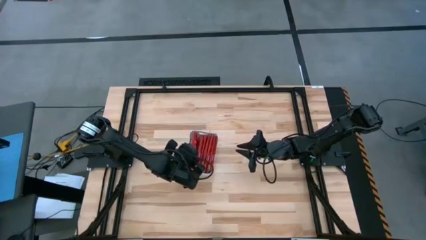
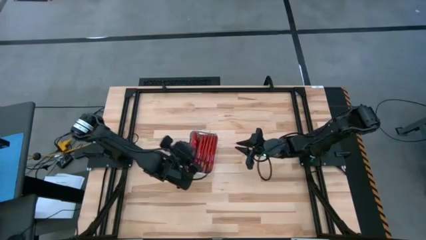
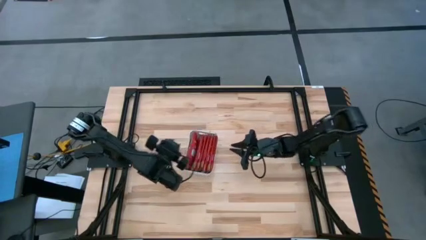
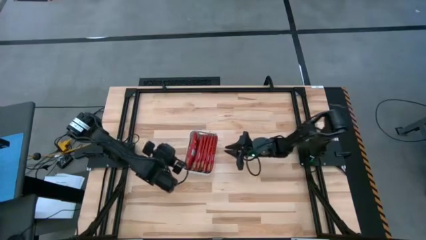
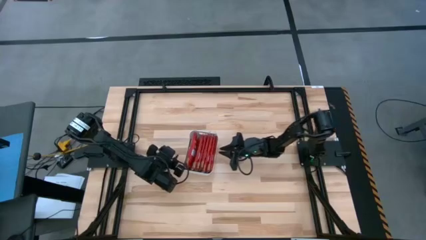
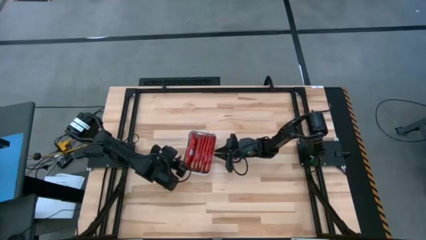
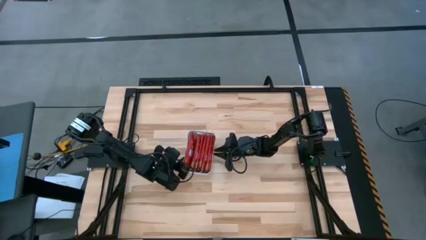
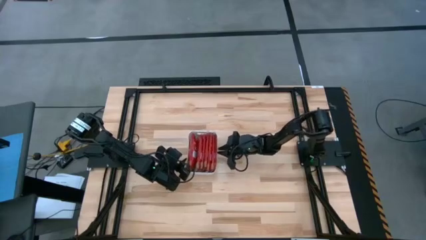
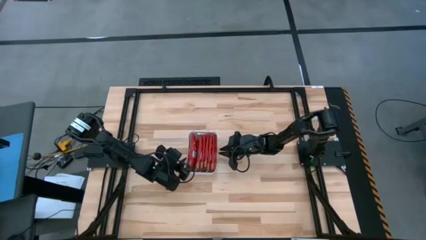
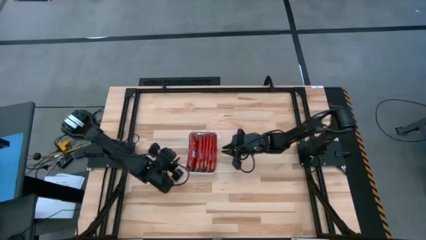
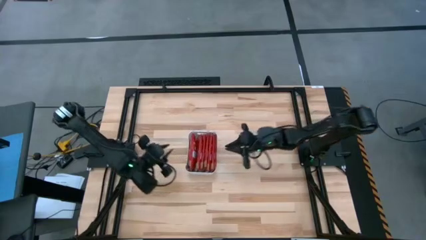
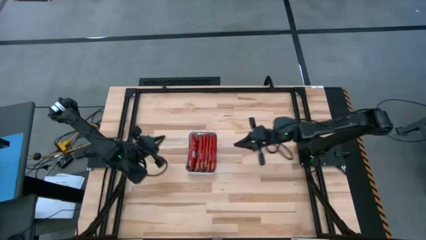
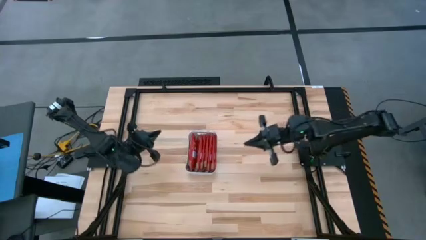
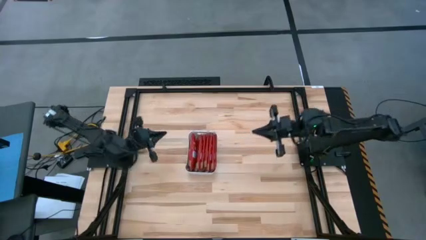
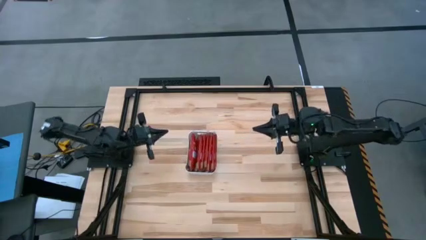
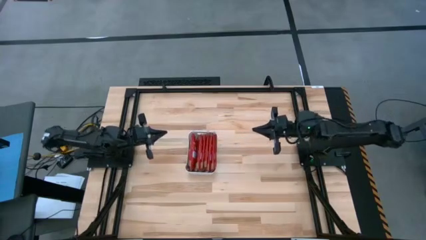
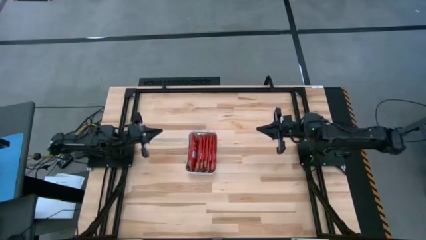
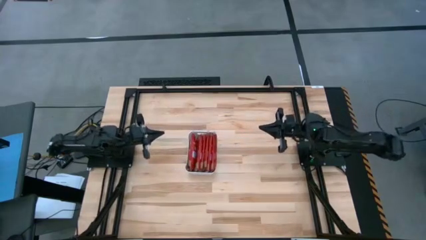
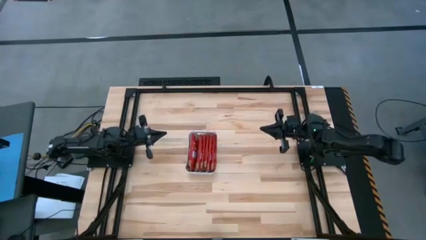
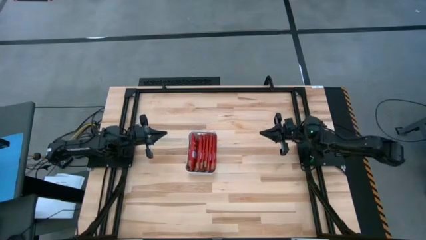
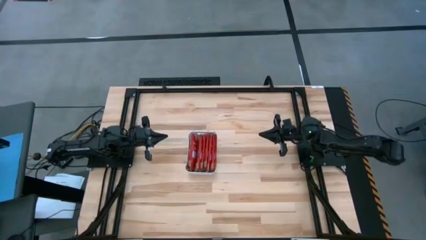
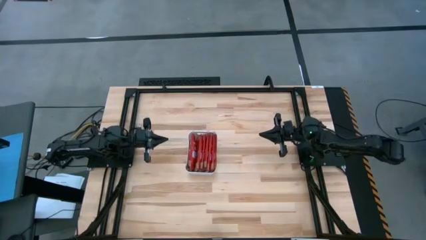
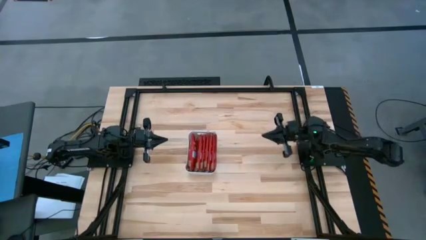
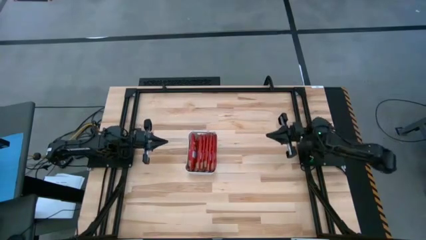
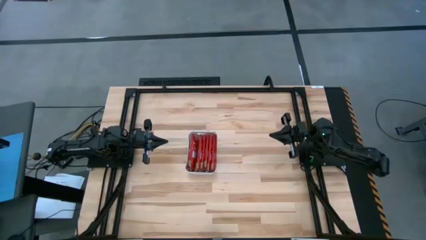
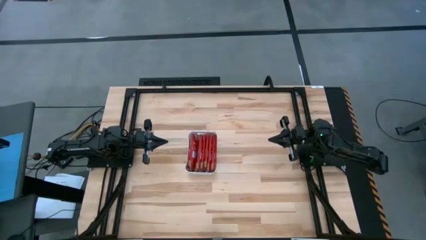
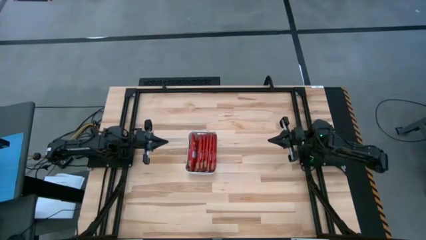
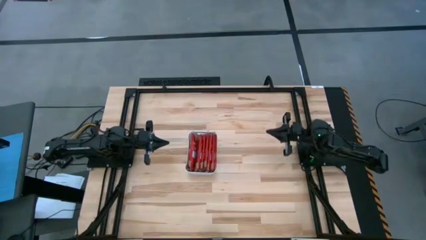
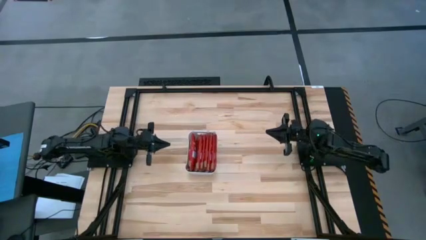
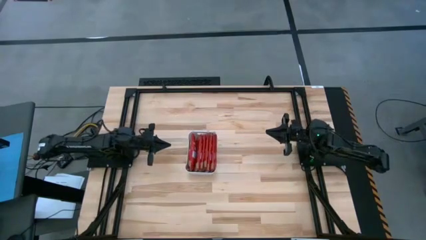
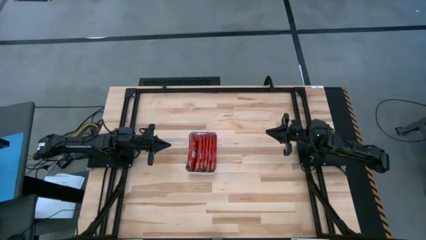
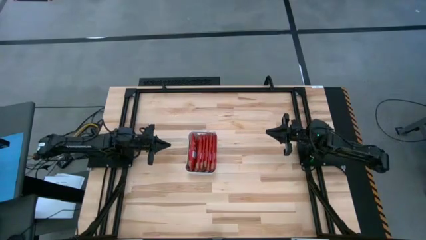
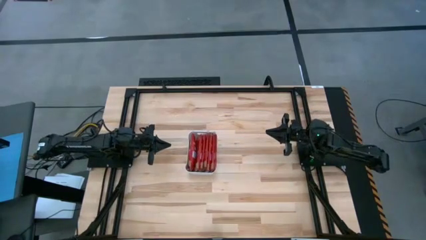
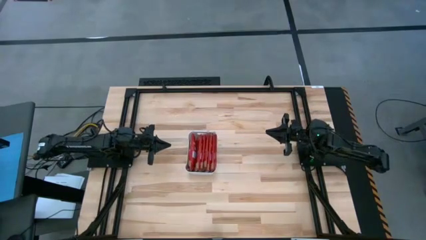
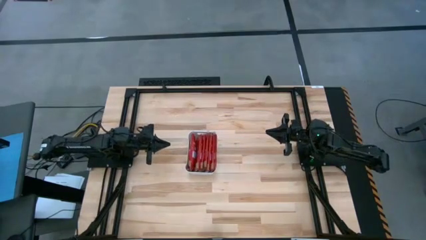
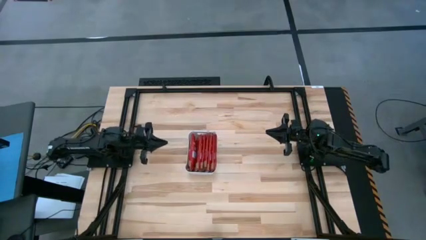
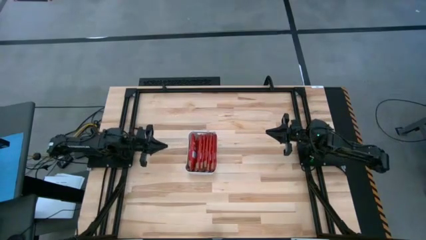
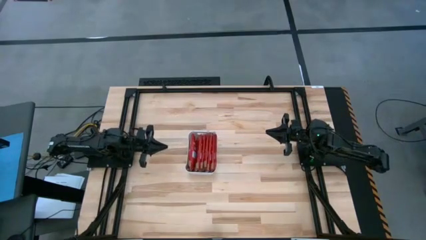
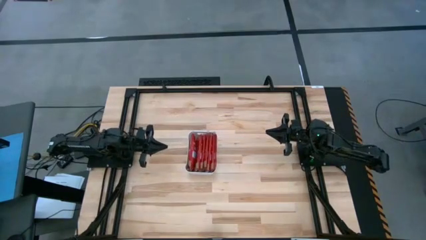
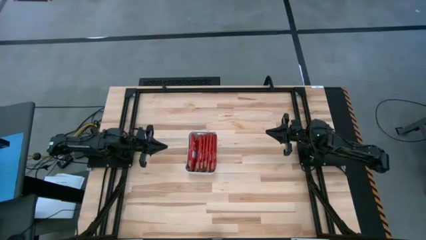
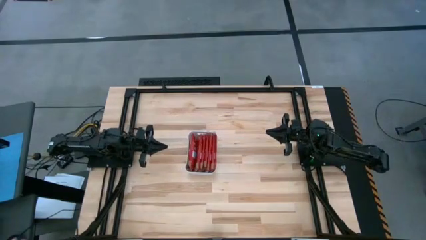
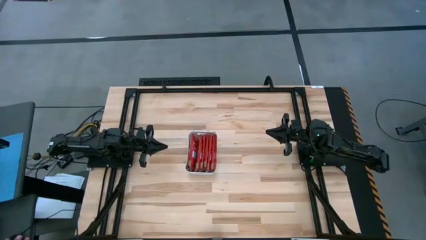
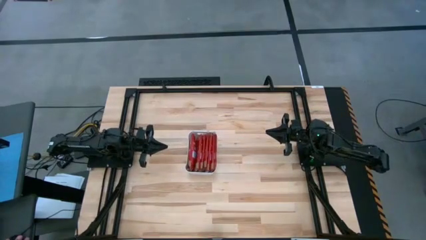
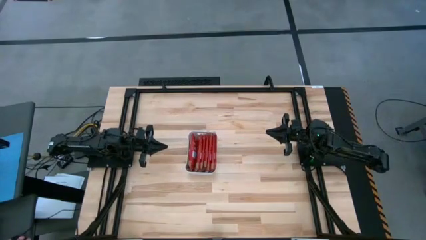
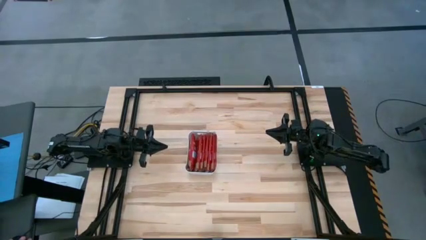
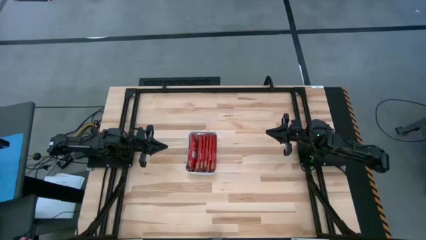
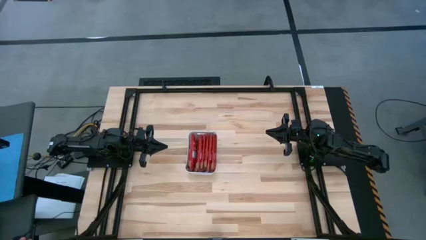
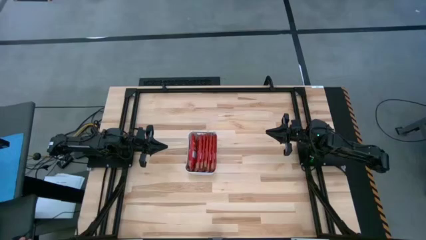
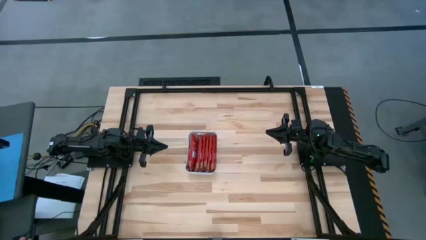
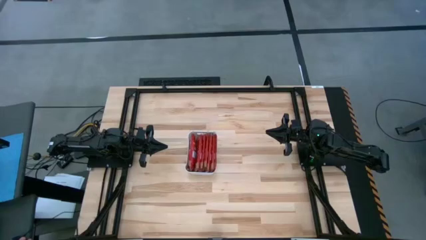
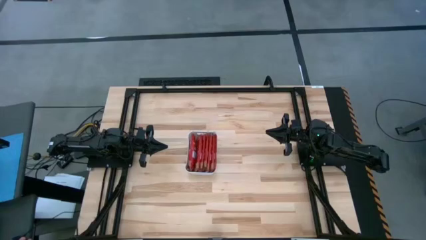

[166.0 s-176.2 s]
Task: Sort popcorn bags into baskets
Return to Home Position

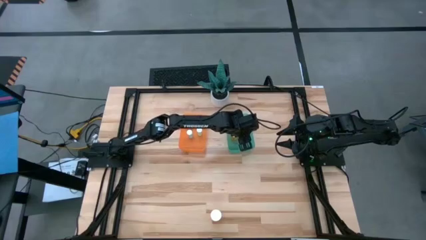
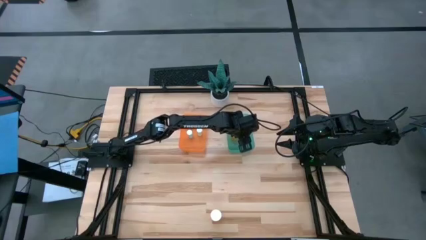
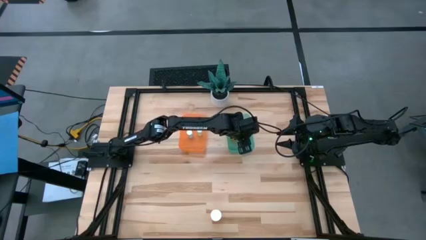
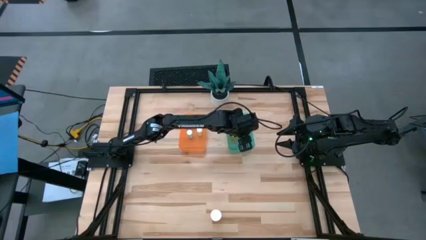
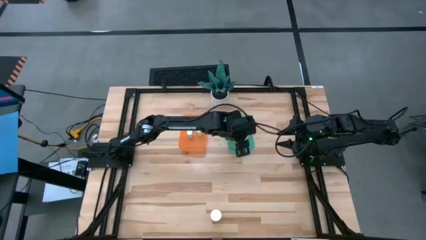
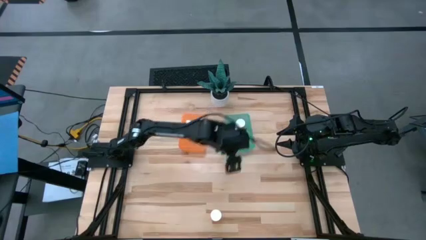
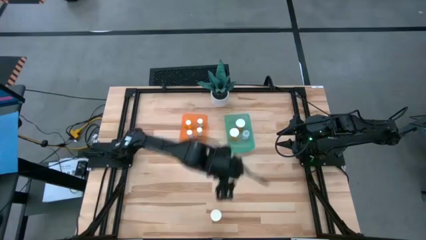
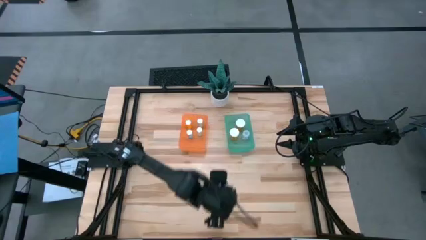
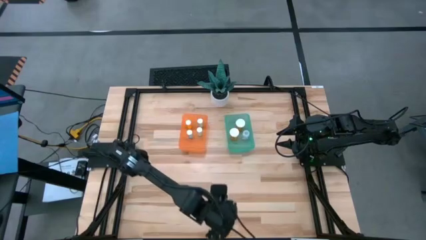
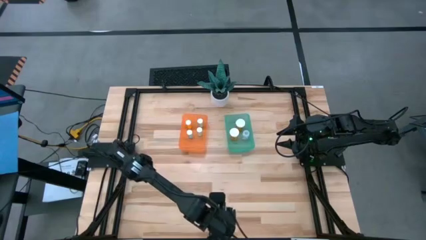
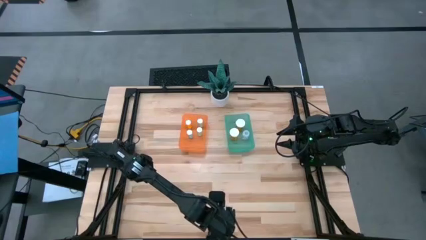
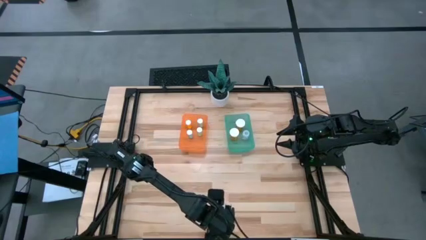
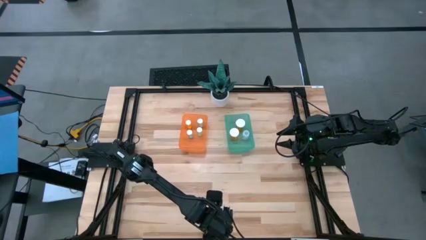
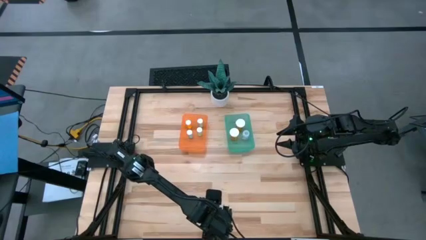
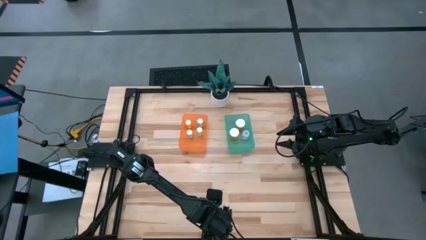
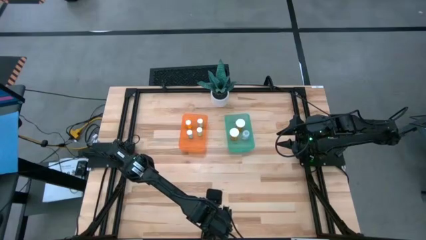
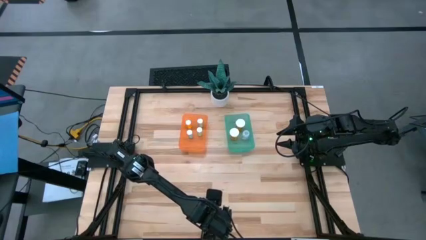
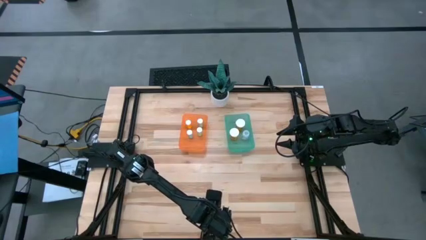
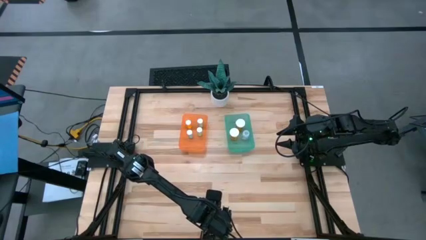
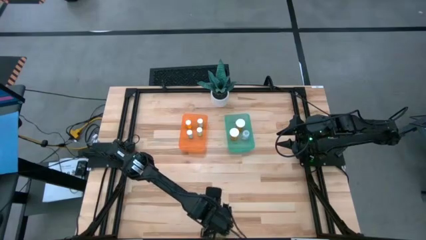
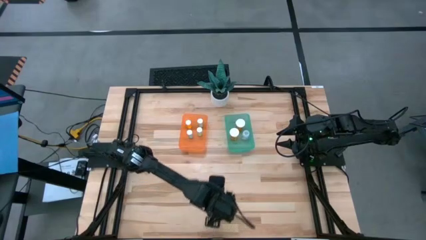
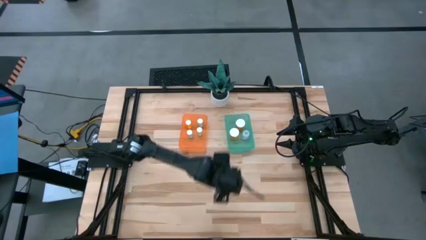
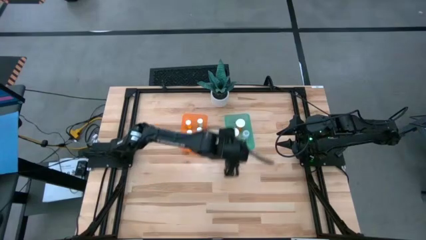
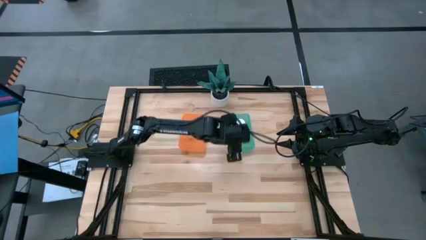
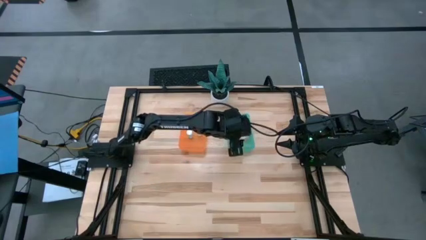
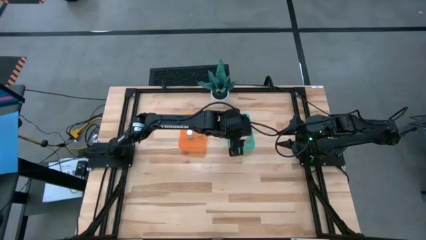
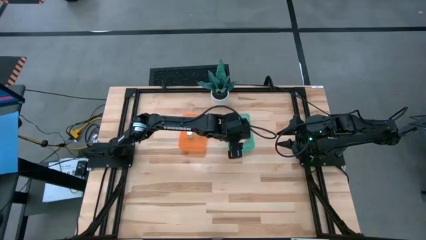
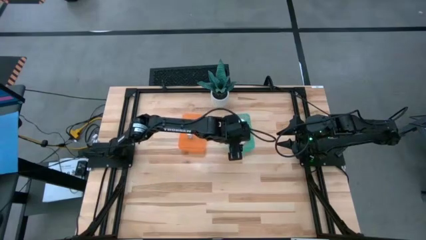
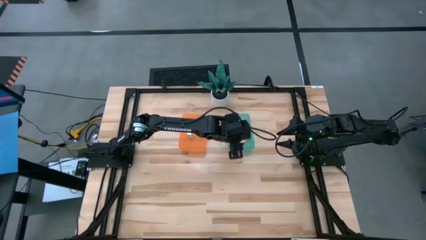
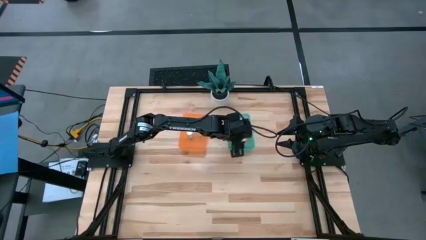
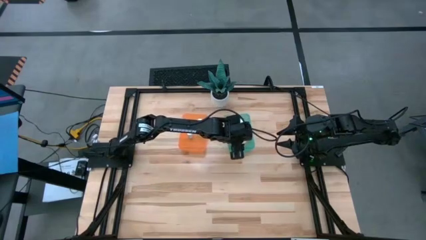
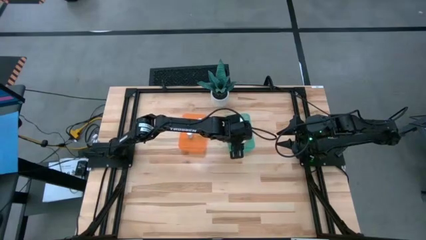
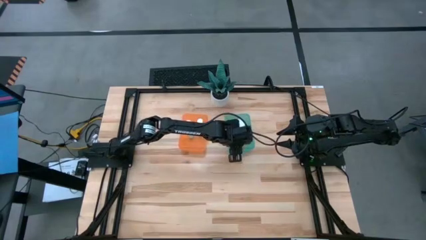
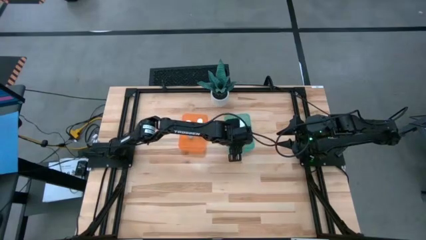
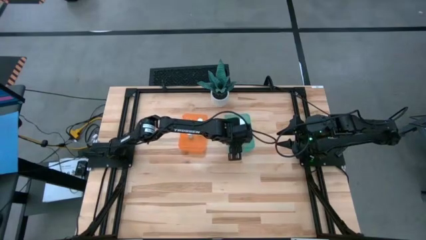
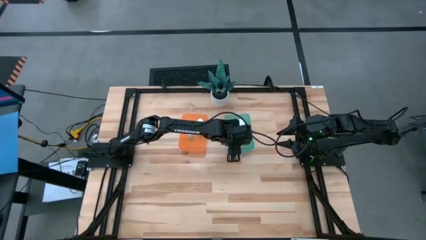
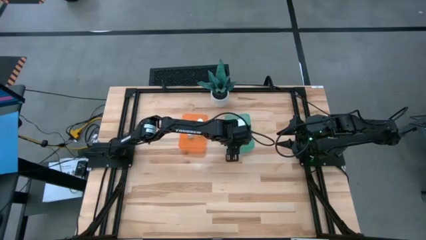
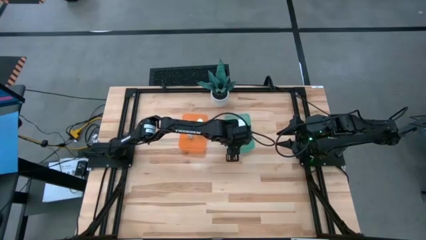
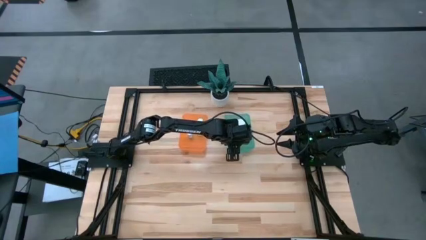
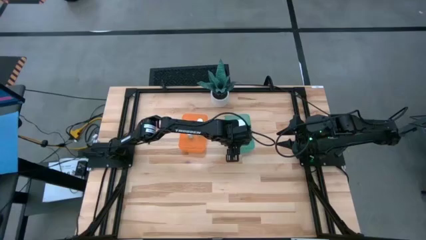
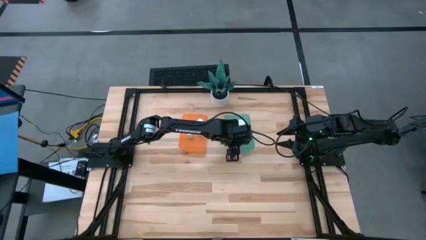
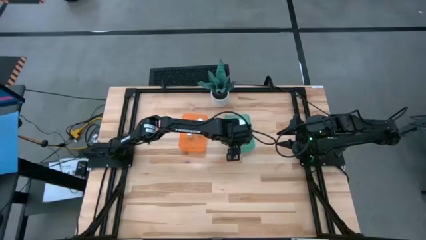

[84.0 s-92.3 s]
Task: Pick and place medicine bottles into bin by pill shape (circle, oval)
Put the orange pill bottle into the green bin
